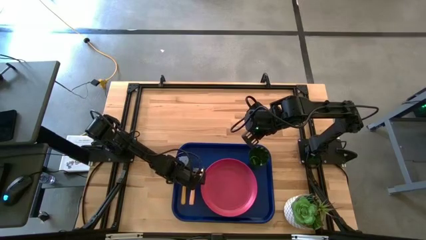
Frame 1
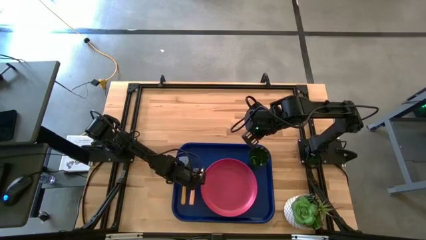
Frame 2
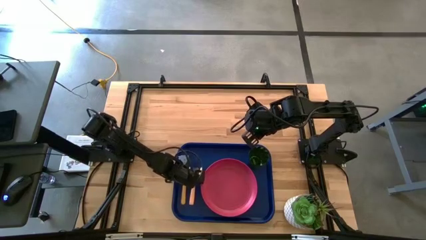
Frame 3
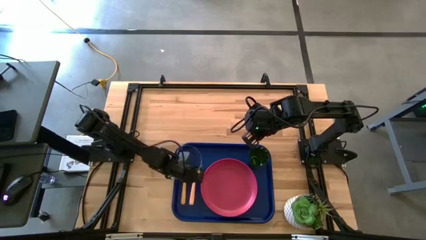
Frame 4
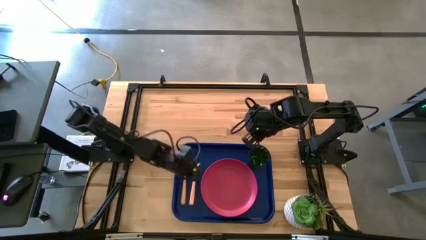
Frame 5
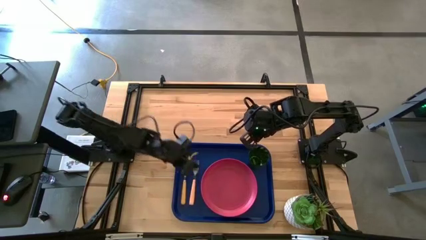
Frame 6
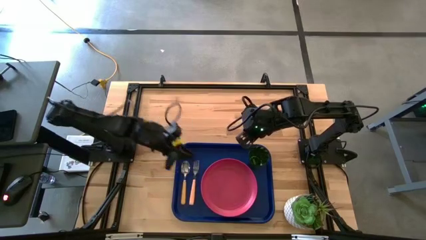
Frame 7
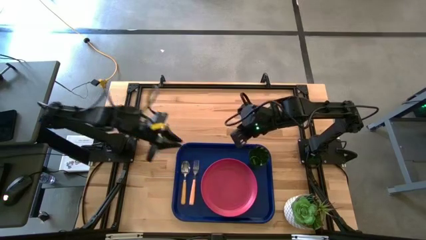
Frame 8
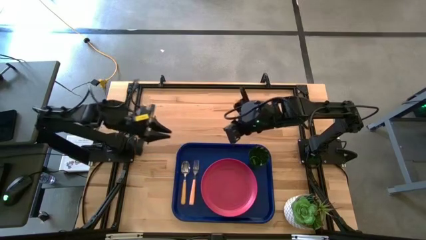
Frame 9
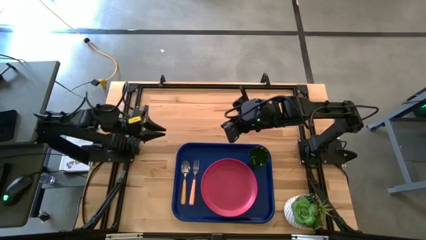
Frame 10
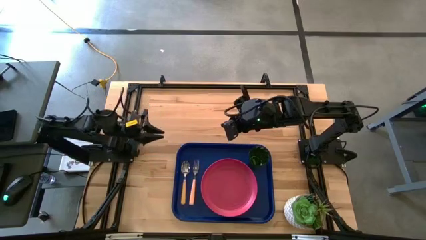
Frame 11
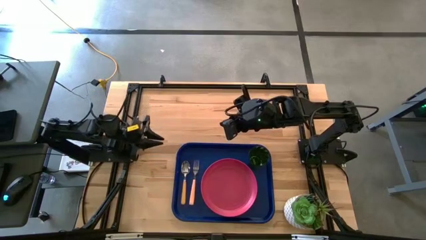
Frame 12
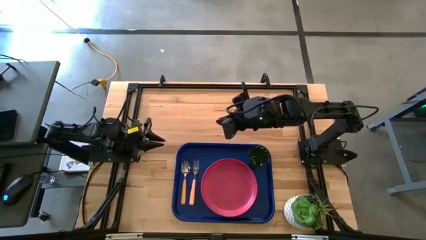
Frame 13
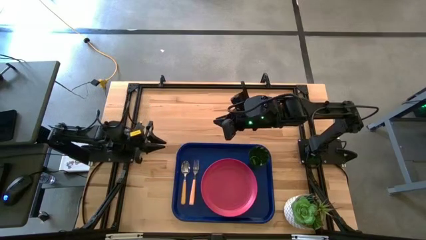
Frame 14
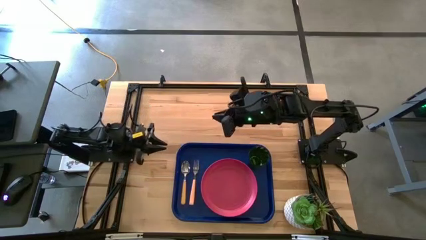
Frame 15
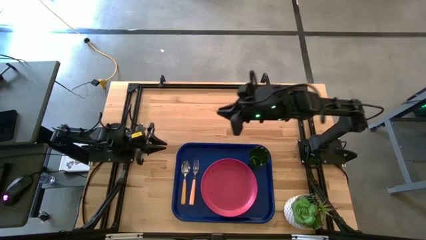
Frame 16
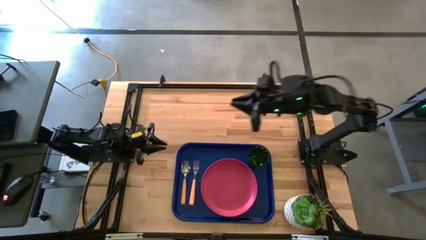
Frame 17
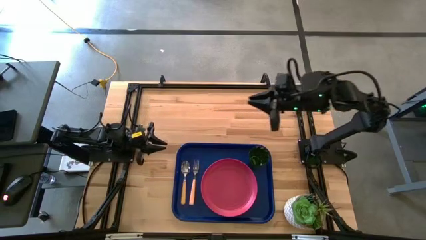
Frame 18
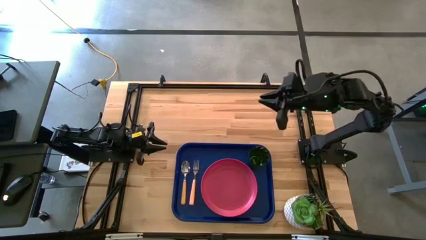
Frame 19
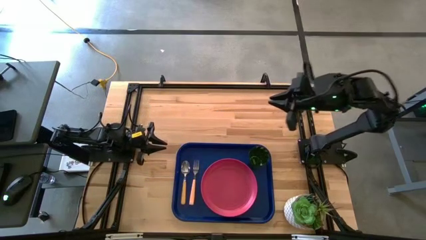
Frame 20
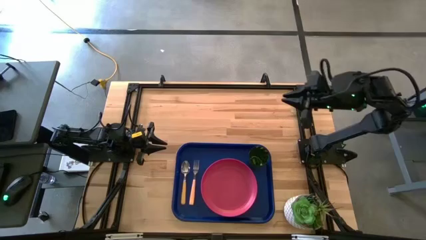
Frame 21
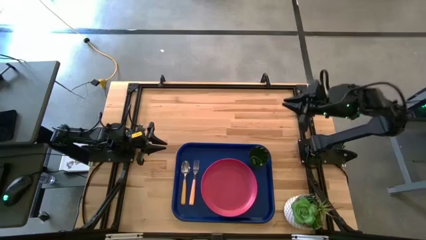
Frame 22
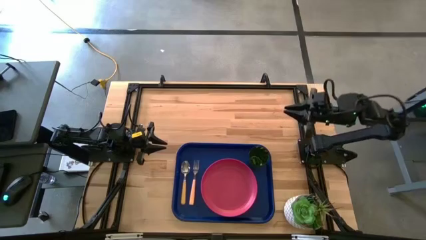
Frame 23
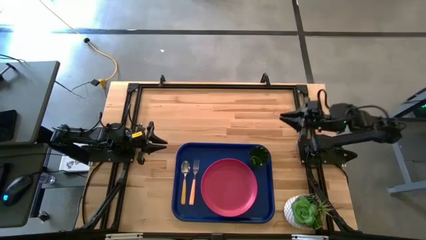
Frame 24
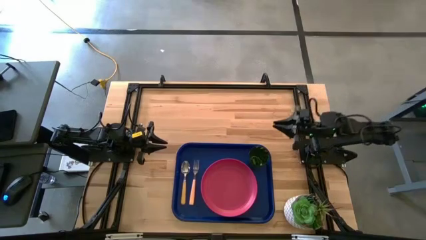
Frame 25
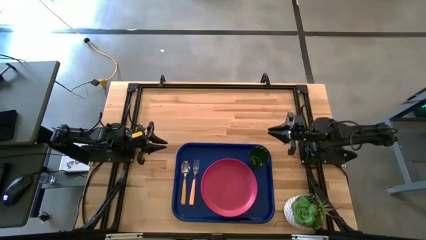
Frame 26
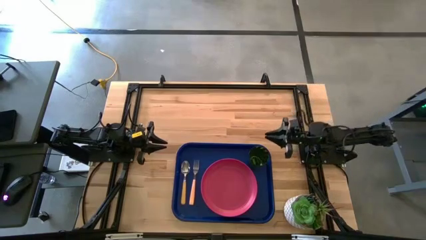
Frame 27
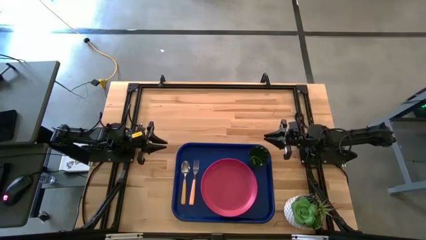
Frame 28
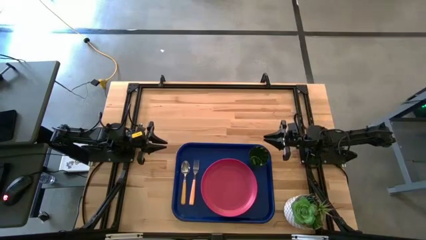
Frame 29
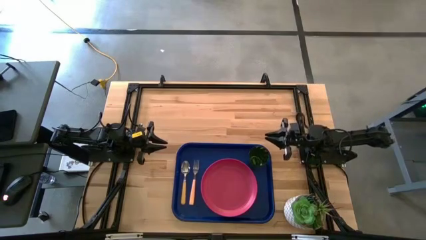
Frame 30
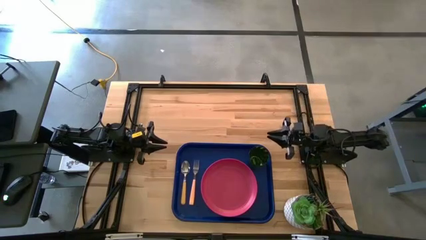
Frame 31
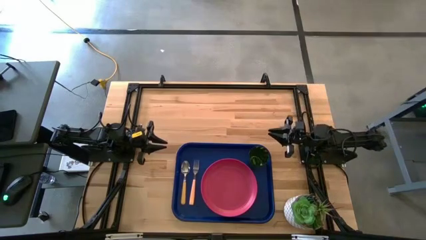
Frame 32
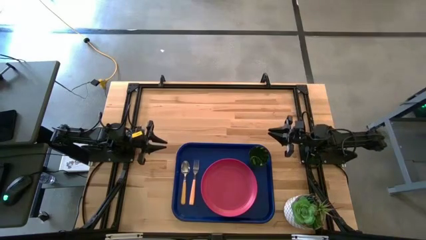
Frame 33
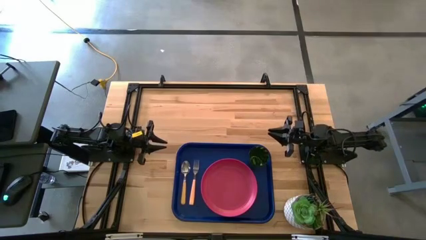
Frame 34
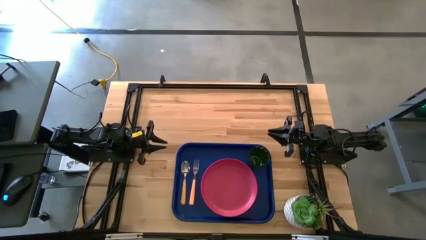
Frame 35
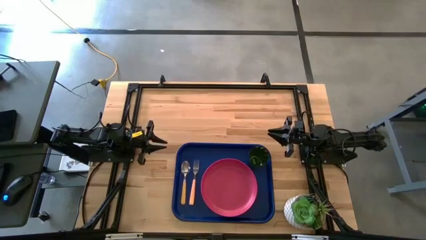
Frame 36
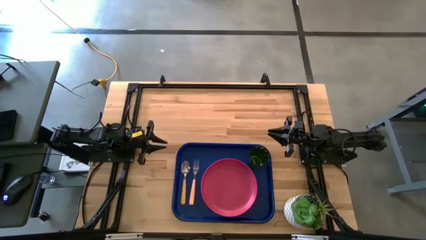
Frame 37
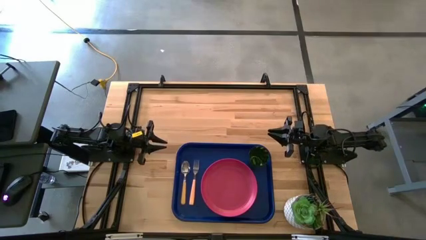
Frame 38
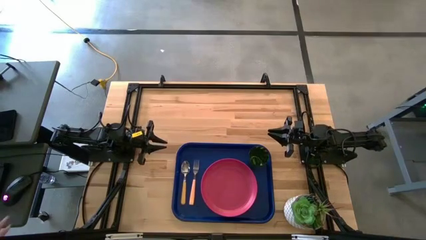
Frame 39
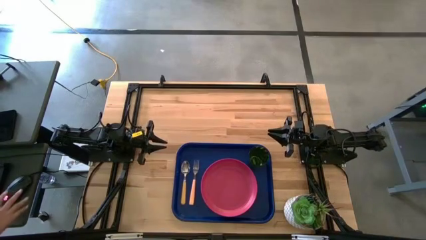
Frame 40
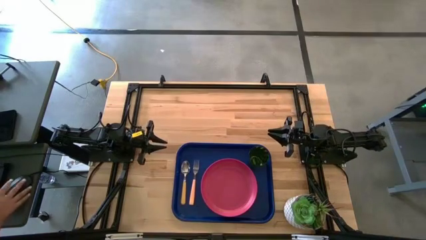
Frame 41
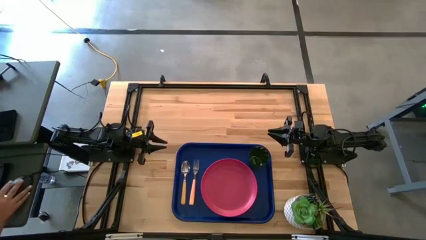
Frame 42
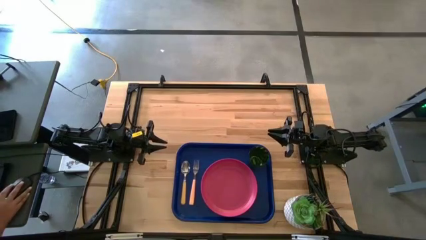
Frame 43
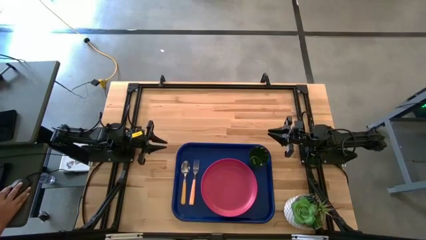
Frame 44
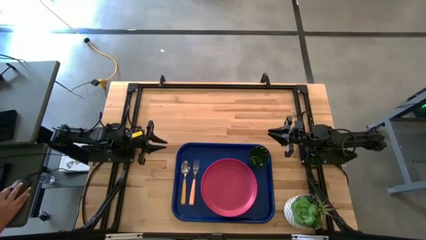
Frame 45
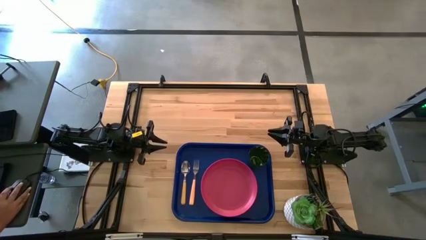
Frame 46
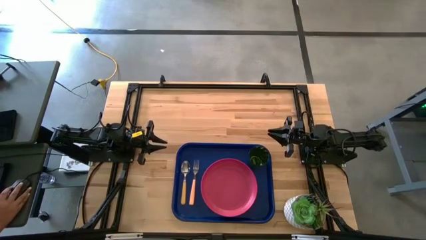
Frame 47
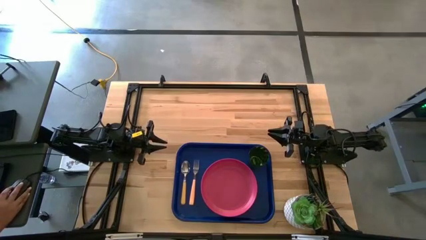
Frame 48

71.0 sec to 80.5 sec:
Task: Pick and place plate/cup/fork/spoon on tray
Return to Home Position

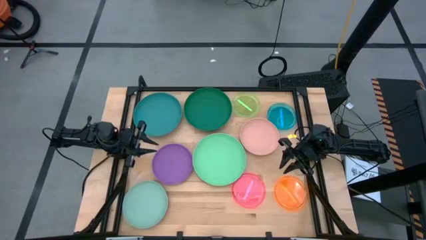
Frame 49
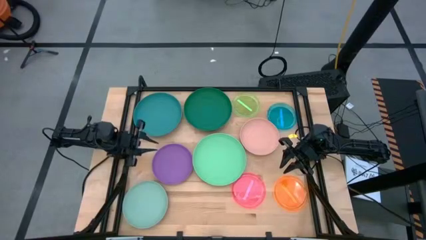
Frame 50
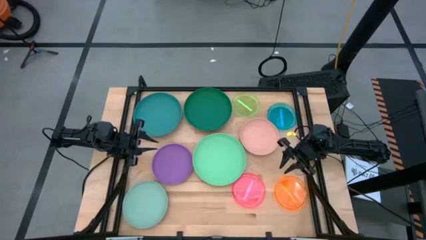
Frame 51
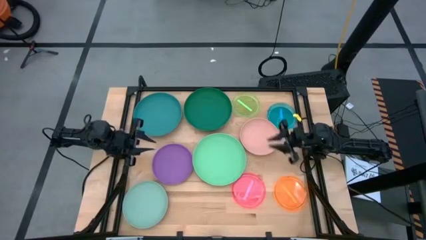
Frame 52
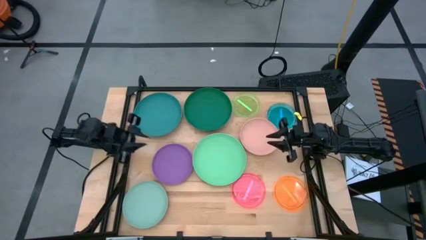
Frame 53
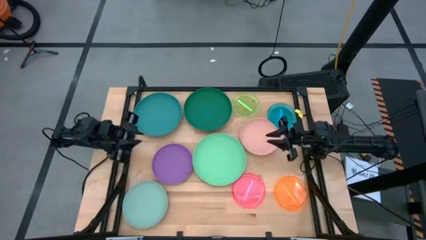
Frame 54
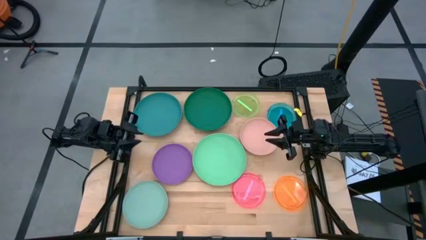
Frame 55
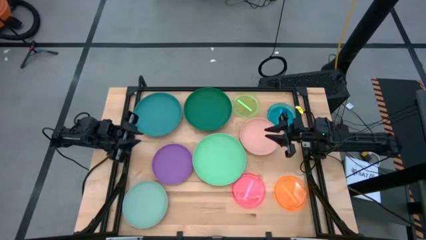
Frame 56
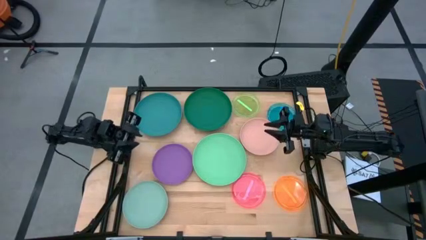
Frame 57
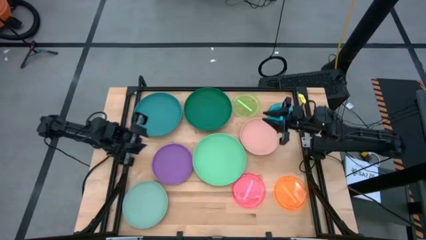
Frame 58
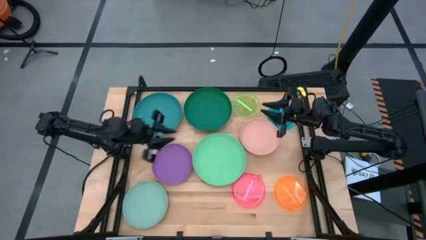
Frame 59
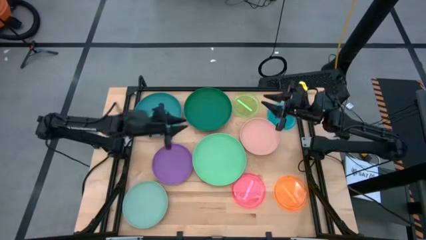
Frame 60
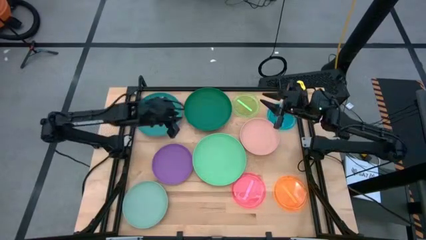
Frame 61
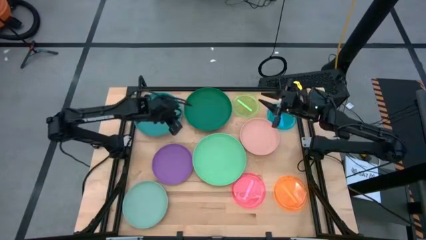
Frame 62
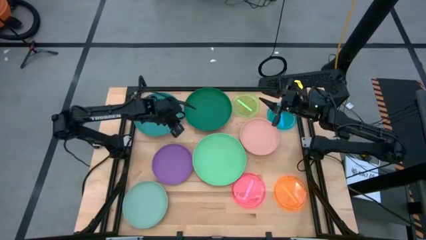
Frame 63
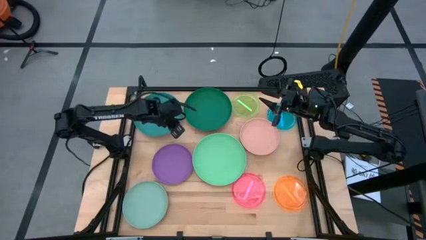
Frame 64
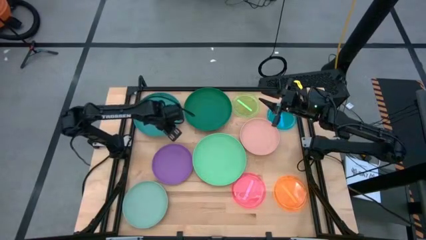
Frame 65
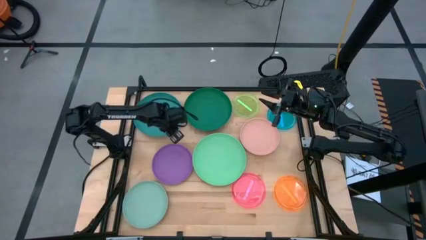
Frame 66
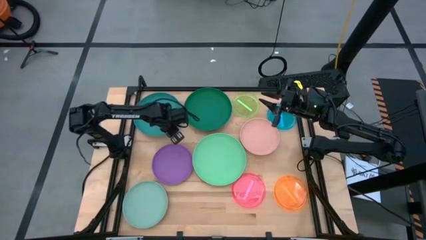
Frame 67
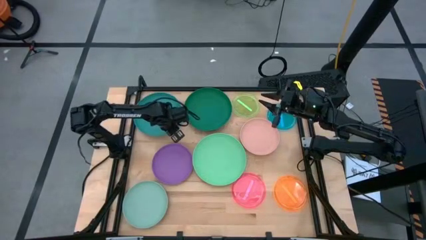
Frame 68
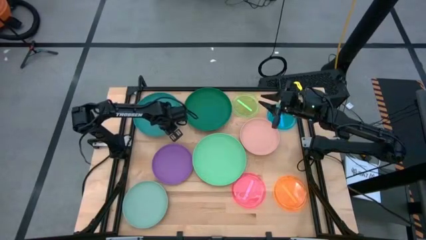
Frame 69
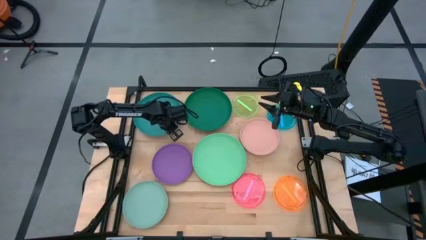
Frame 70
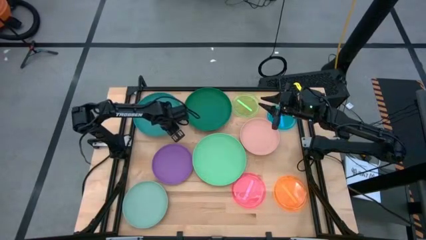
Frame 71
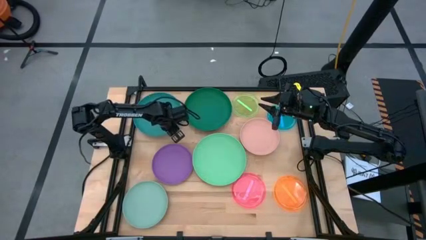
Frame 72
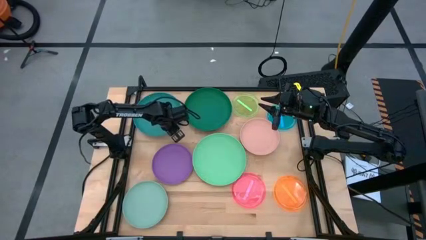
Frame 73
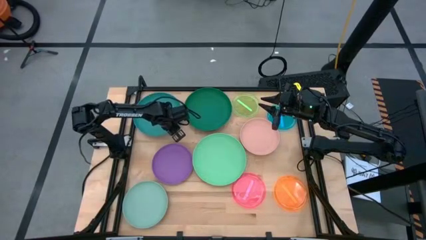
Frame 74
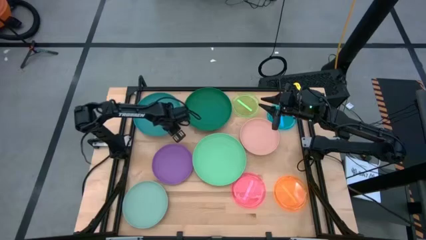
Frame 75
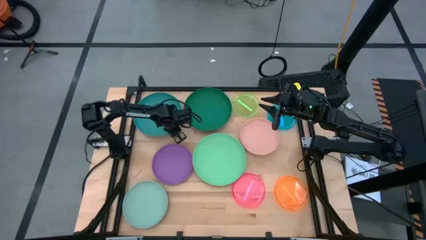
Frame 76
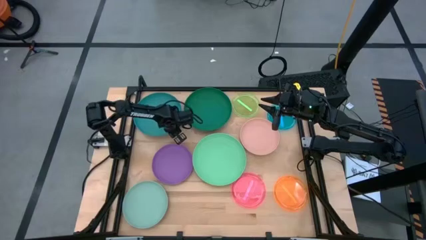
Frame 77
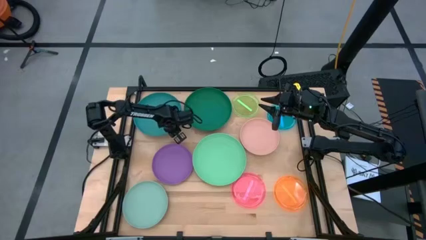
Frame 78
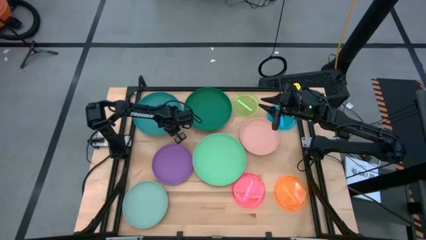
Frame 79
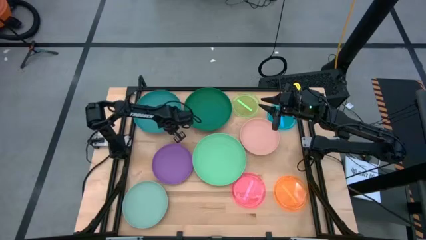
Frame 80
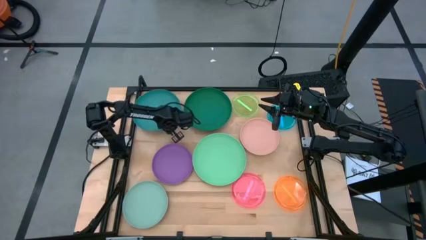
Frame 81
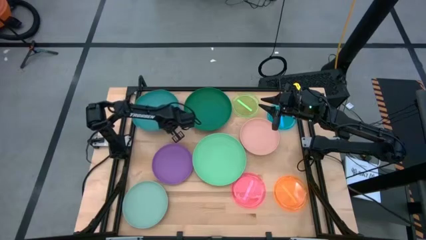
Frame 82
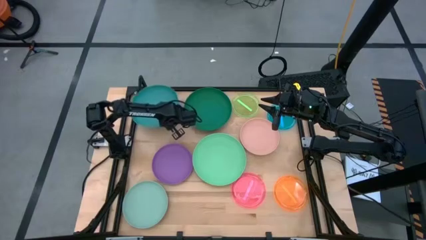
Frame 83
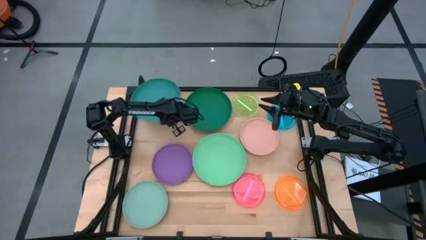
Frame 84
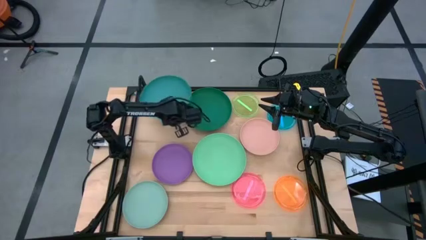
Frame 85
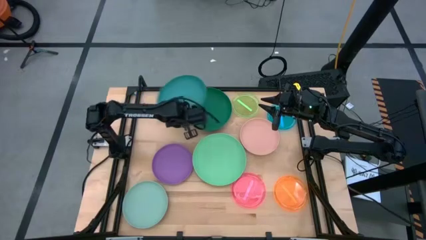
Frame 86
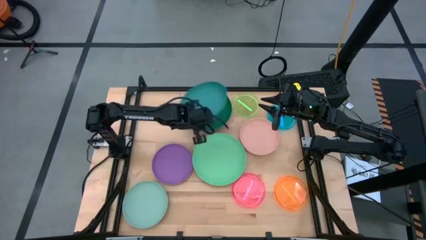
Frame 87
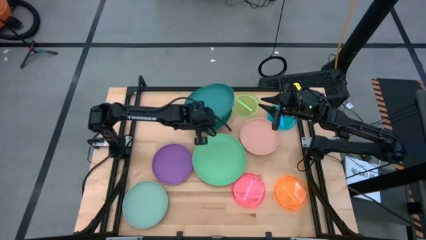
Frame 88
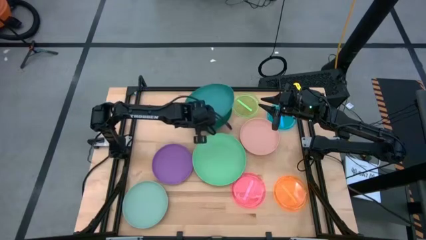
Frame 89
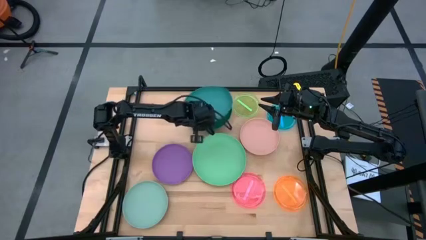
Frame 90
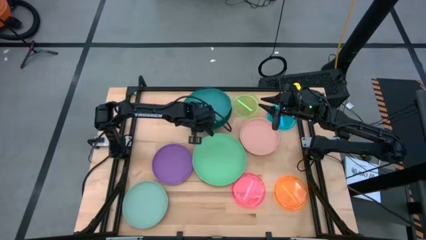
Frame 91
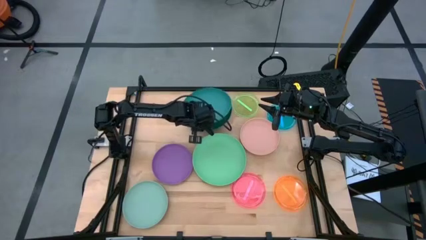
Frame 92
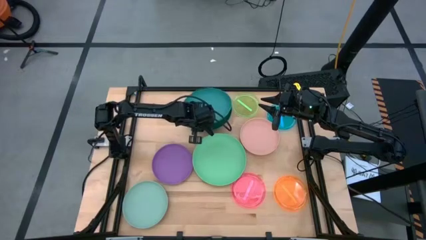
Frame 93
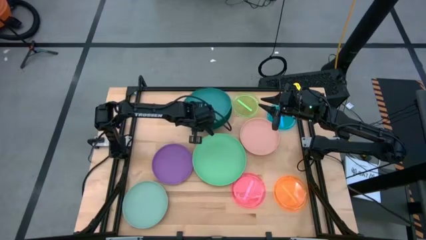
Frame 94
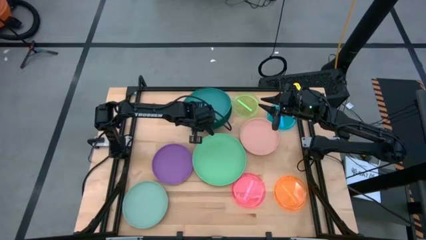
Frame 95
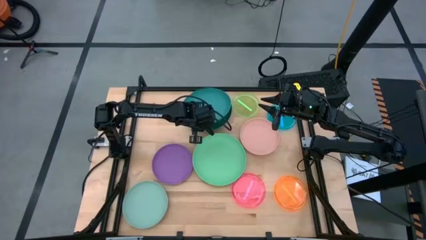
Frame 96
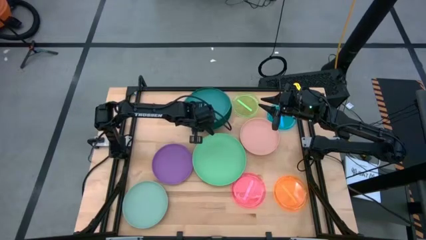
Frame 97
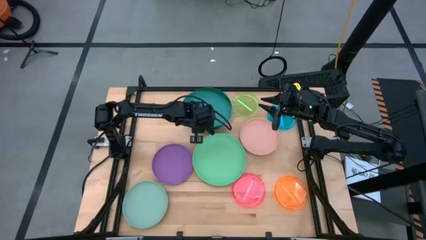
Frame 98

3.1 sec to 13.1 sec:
Task: Stack plastic plates
Stack the dark blue plate on top of the dark green plate
